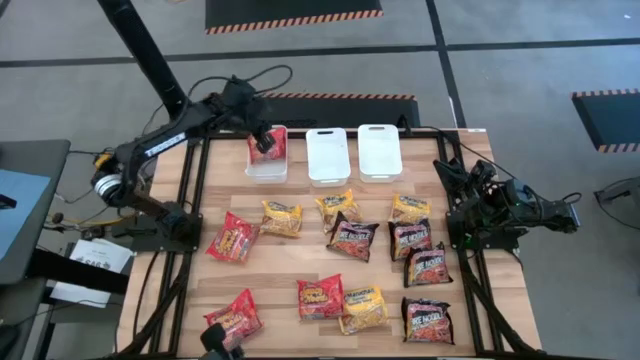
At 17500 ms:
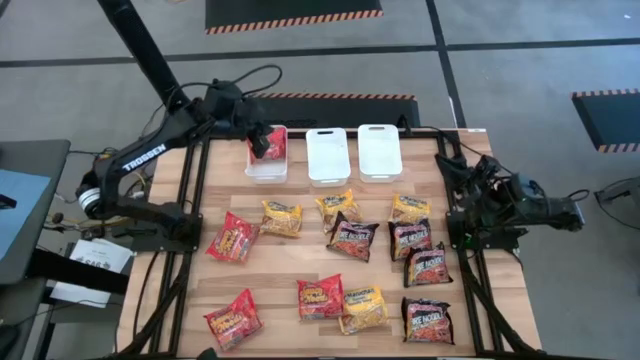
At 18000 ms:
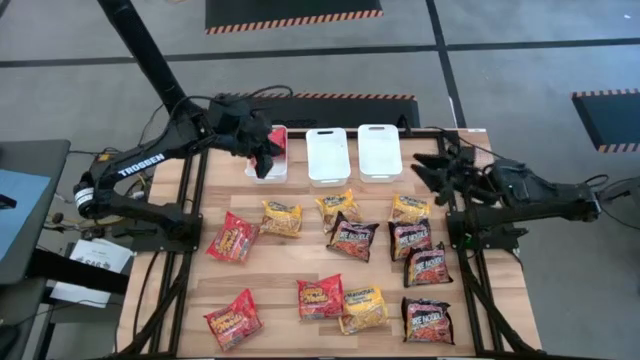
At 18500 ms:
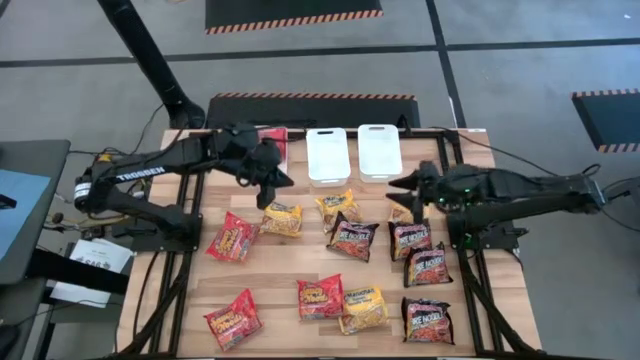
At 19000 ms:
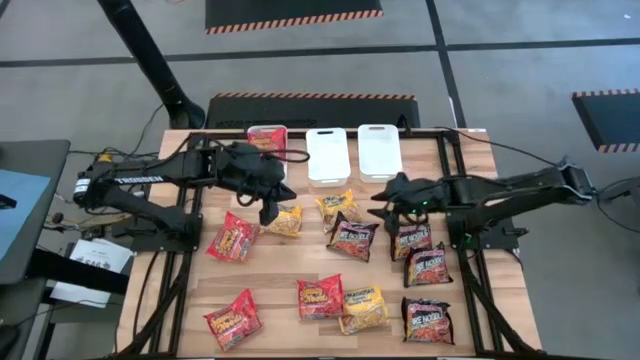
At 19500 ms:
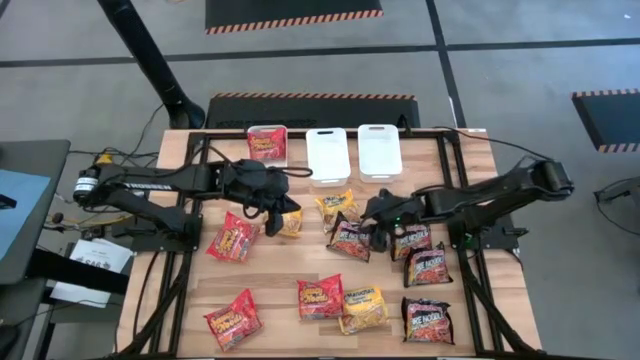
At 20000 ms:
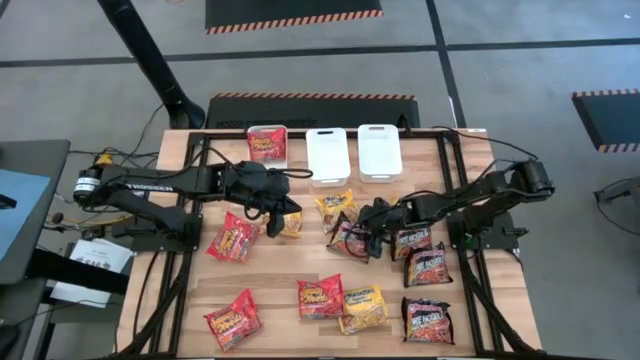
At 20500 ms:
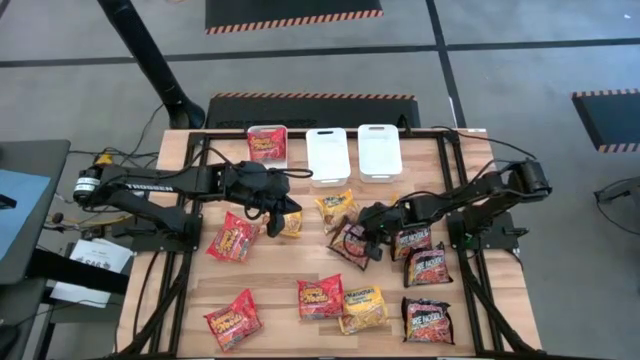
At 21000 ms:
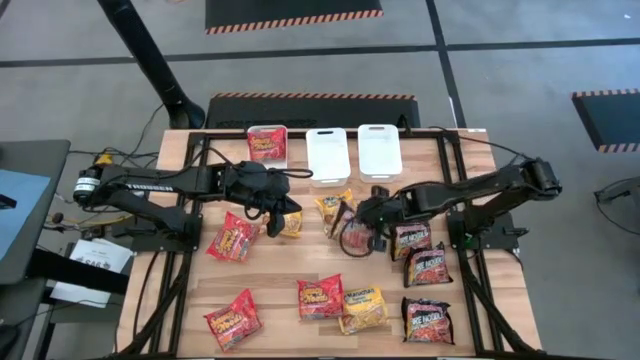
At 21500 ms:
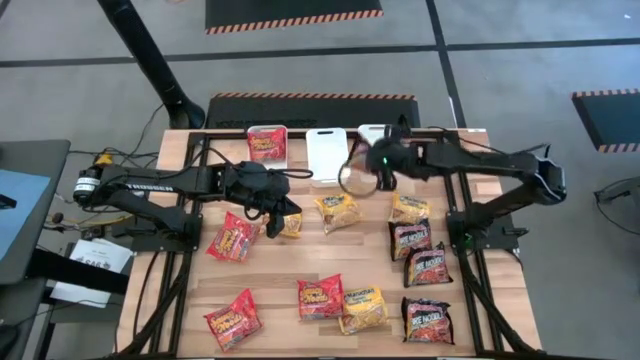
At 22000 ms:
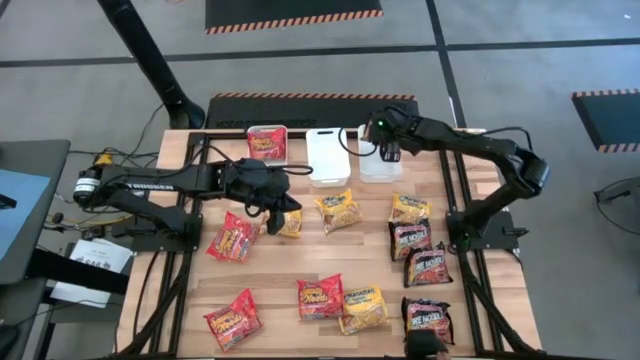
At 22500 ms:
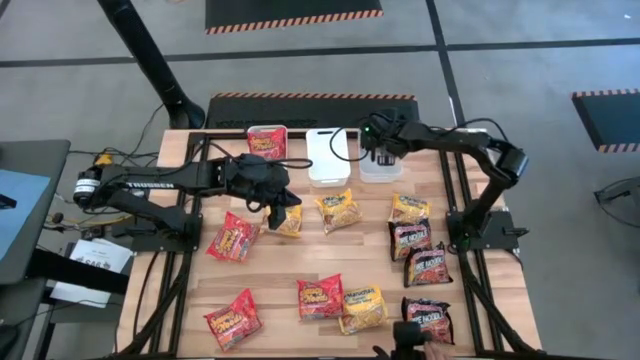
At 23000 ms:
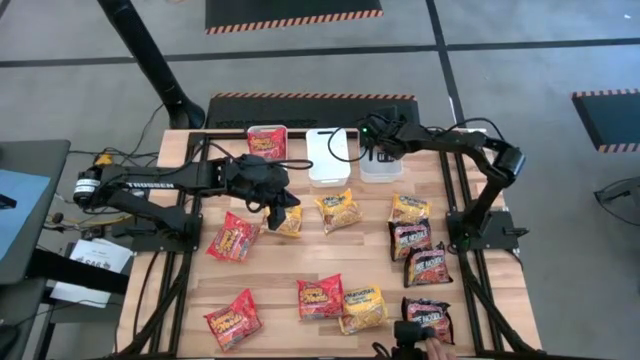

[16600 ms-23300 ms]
Task: Sort Maruchan noodles
Put the black noodle pack into the right white bin

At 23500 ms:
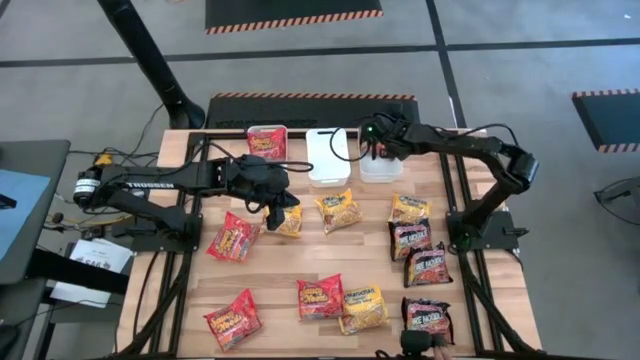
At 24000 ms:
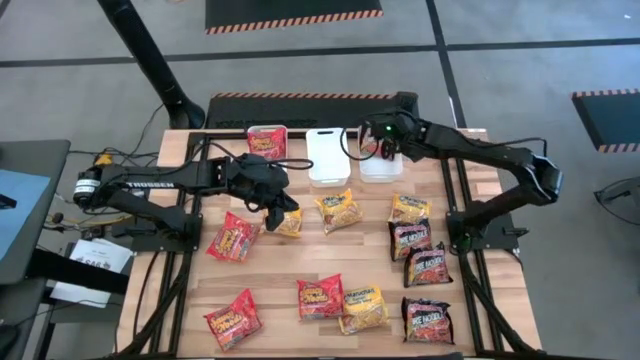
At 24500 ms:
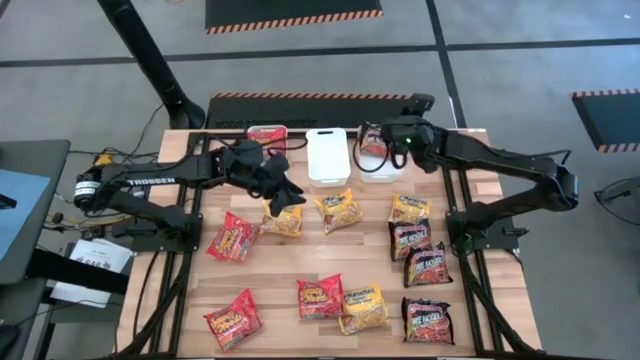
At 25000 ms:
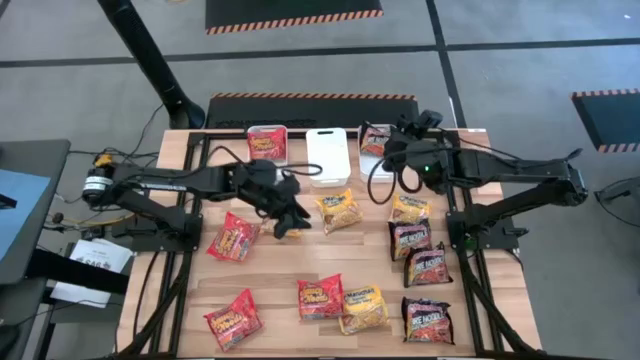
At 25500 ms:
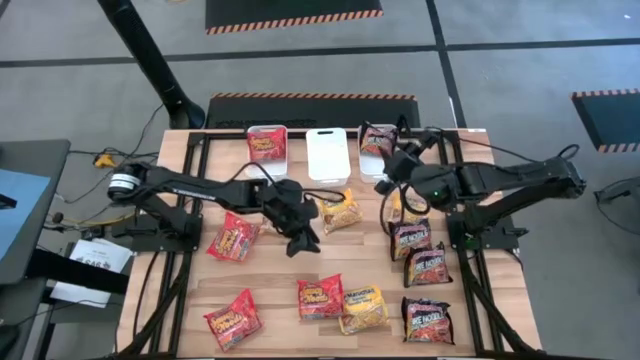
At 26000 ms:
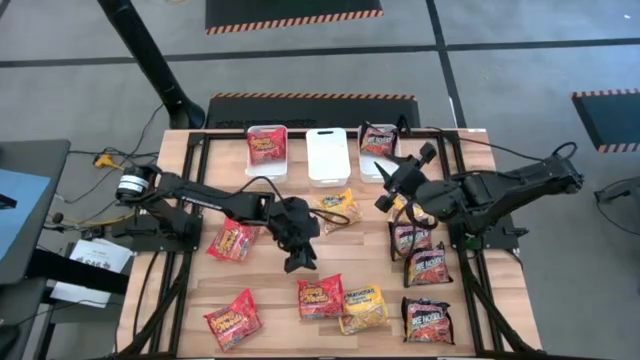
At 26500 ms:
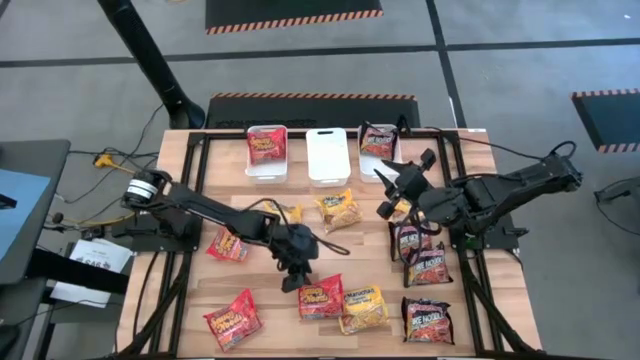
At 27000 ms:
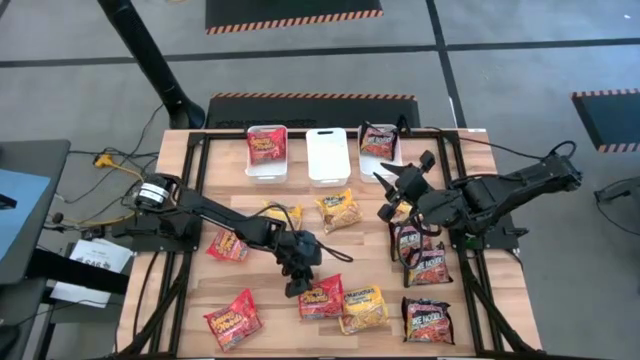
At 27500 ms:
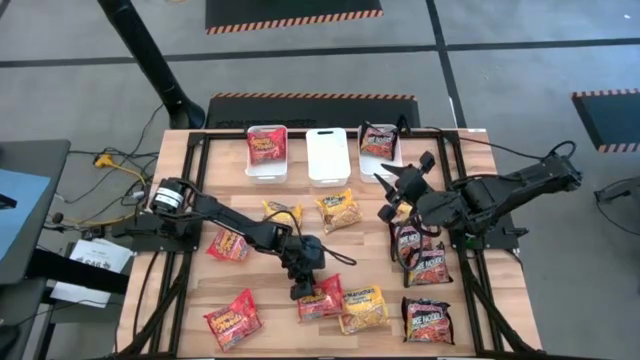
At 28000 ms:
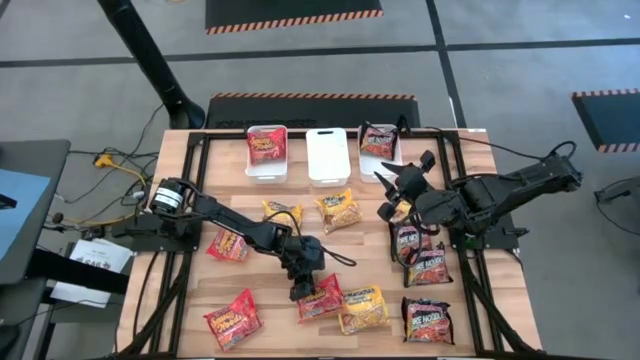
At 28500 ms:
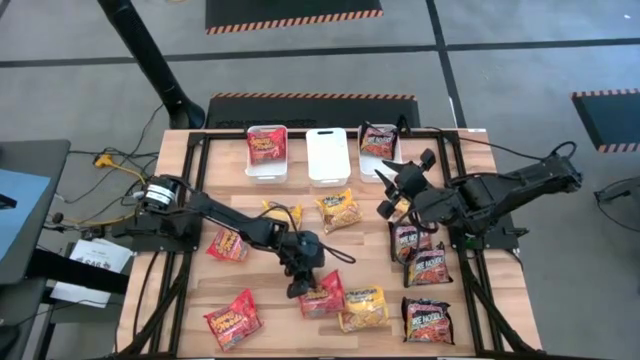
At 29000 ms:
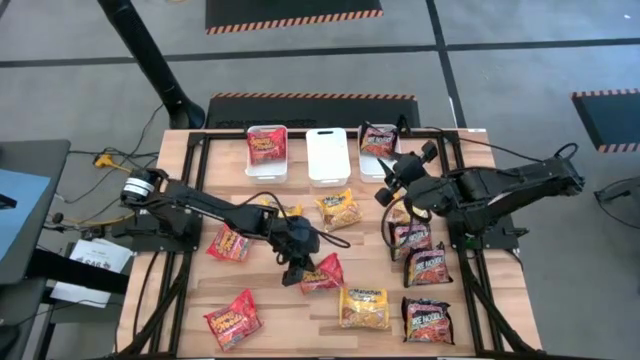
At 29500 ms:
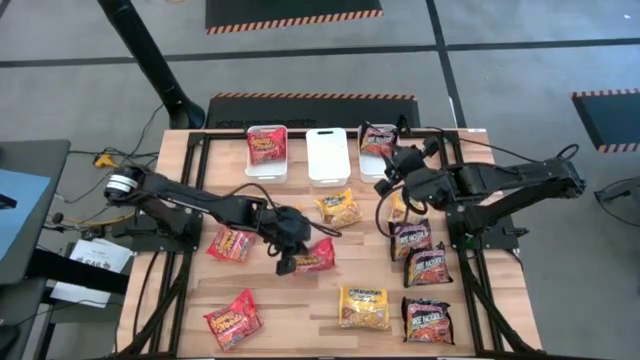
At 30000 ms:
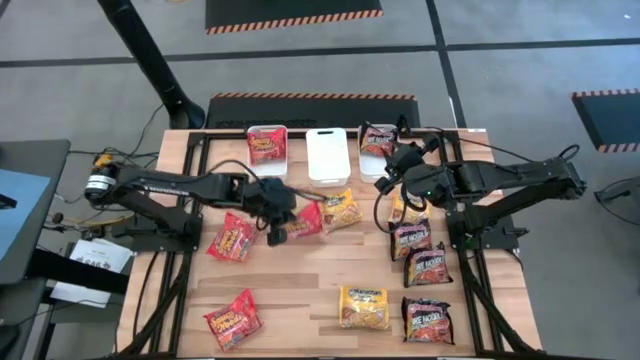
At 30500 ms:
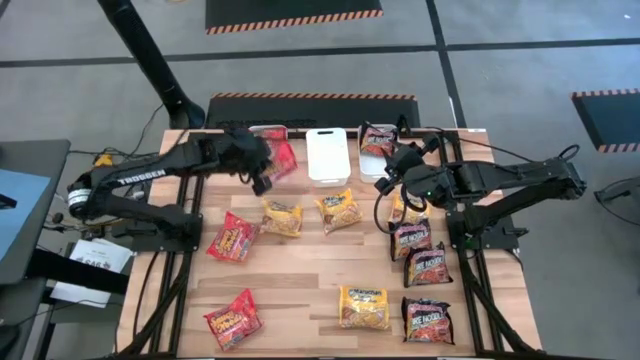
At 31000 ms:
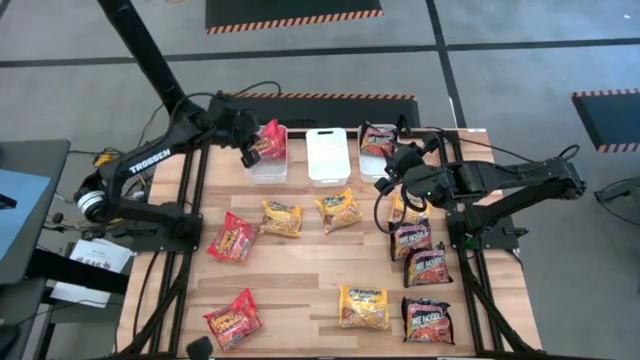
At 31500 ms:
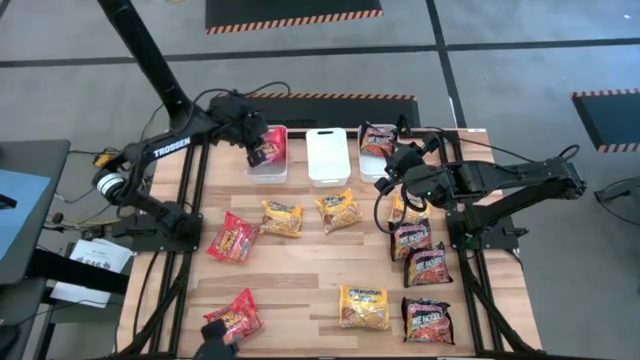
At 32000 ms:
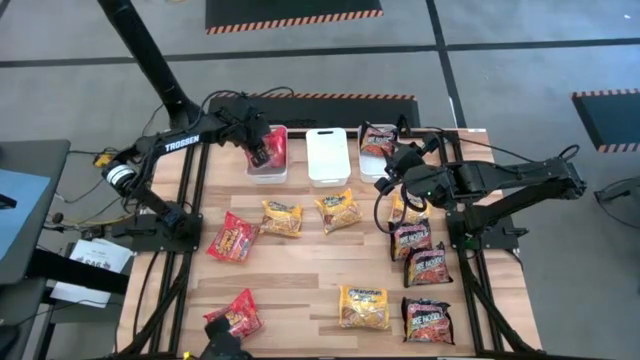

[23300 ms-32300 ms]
Put the orange noodle pack into the left white bin

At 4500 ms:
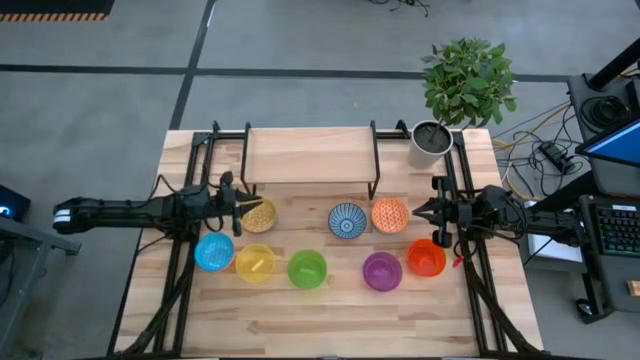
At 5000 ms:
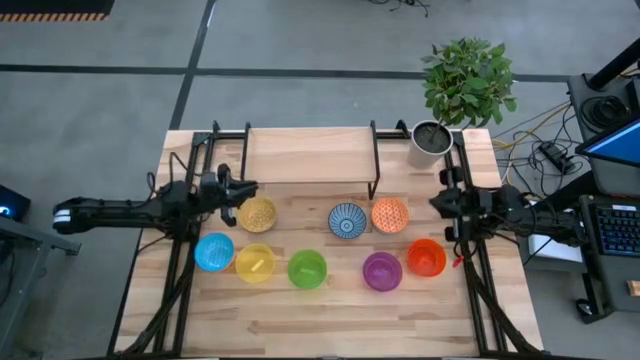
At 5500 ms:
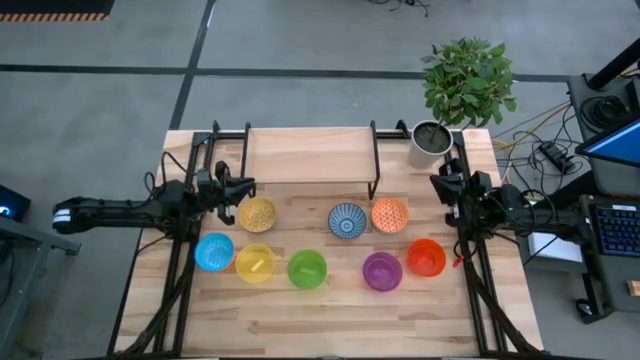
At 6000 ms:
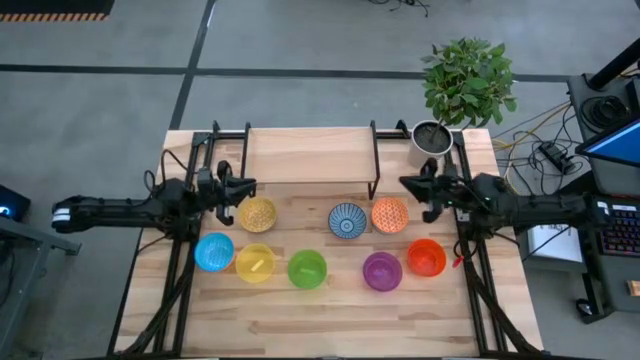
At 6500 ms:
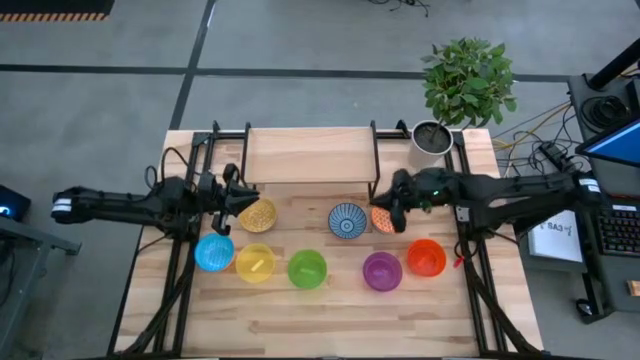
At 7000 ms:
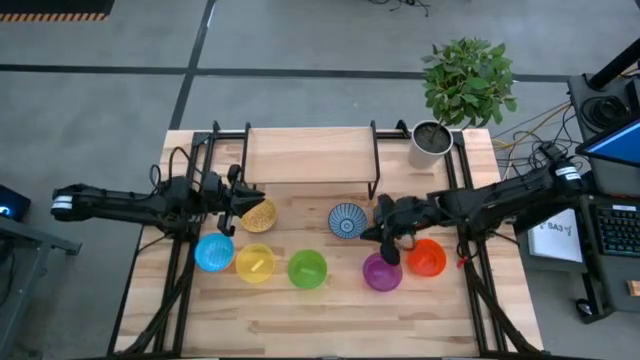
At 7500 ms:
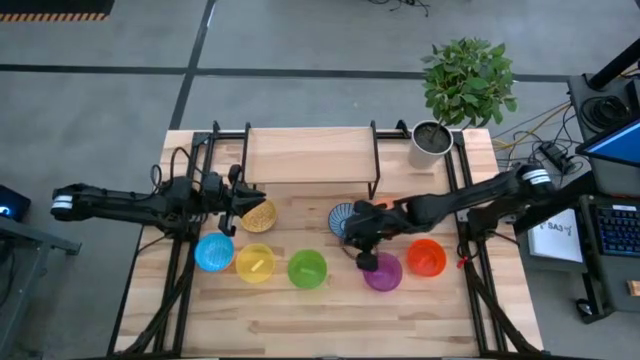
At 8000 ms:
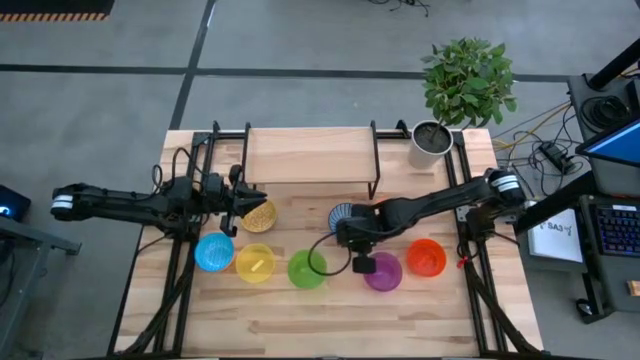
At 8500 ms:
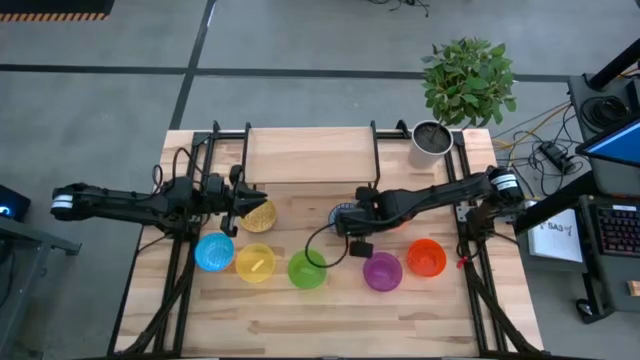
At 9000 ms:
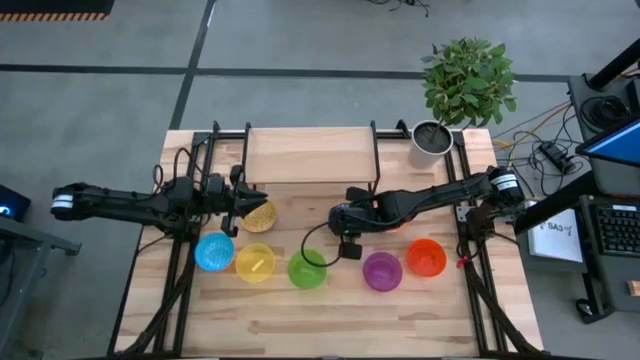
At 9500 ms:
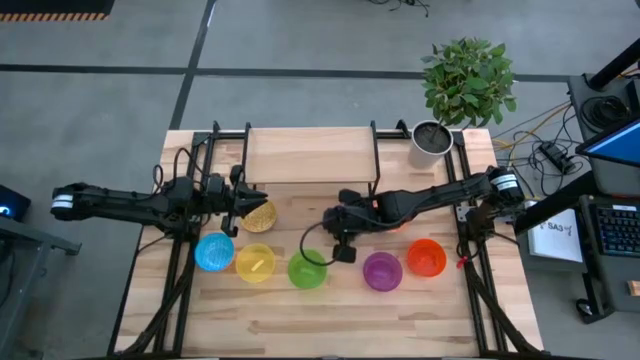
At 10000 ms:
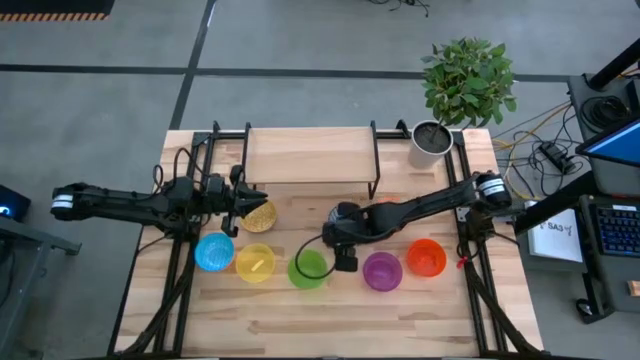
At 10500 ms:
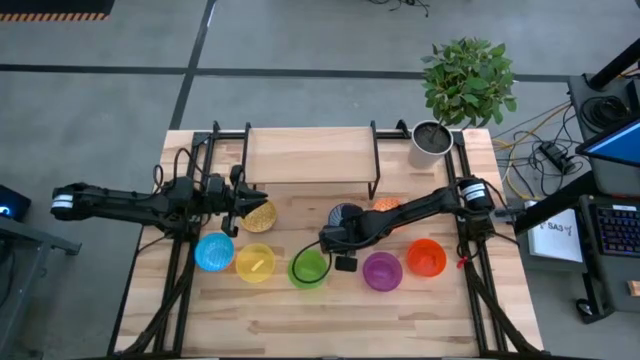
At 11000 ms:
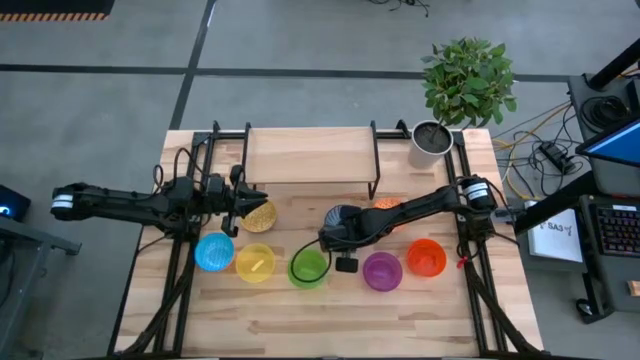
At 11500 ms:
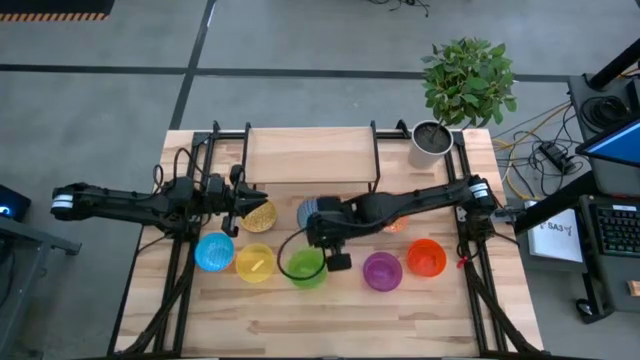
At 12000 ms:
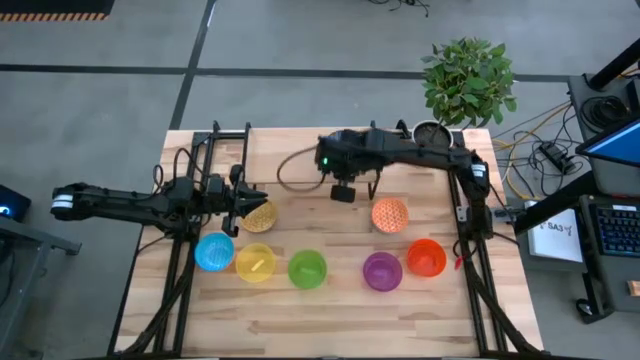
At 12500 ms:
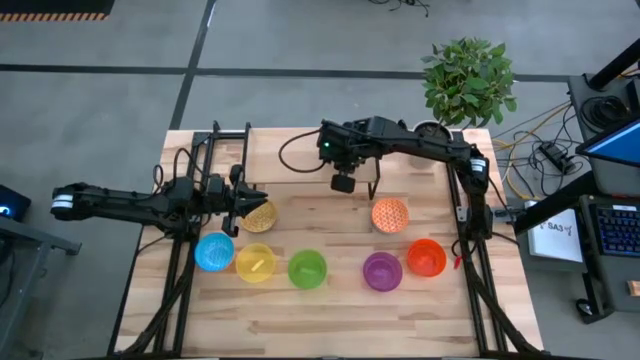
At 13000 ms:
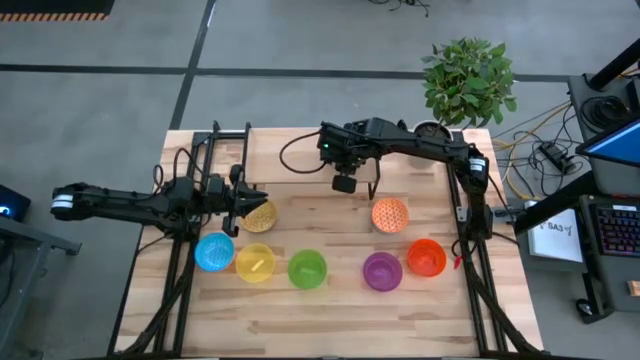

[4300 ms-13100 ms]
Task: Place and stack bowls onto a shelf
Put the red bowl on the shelf
